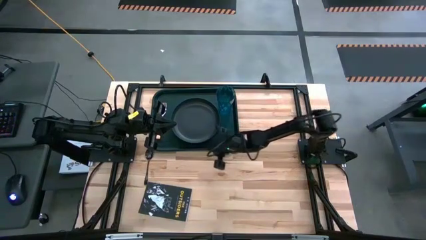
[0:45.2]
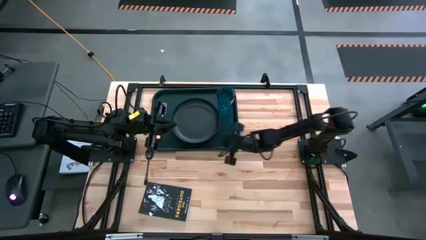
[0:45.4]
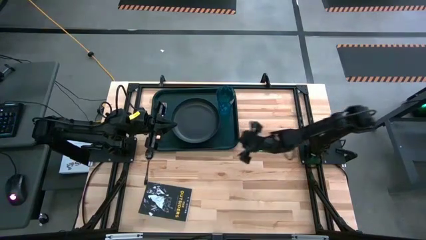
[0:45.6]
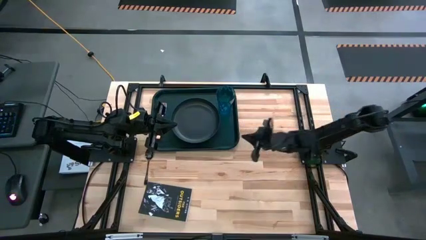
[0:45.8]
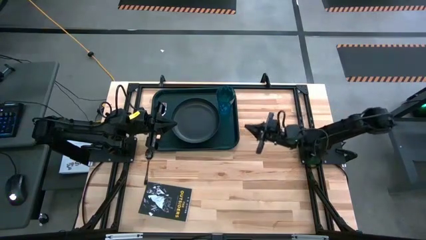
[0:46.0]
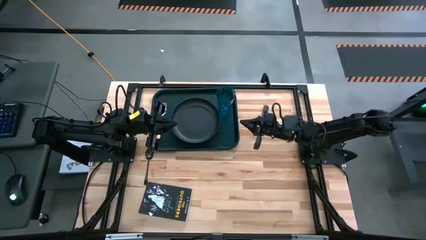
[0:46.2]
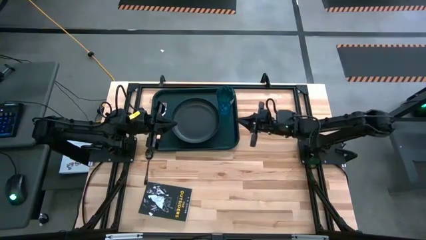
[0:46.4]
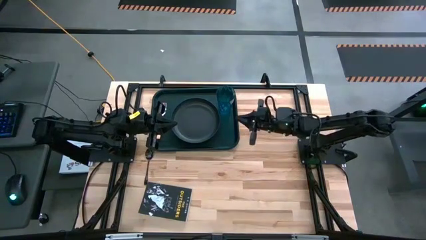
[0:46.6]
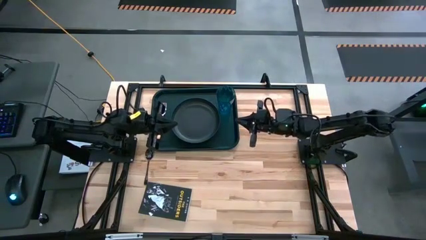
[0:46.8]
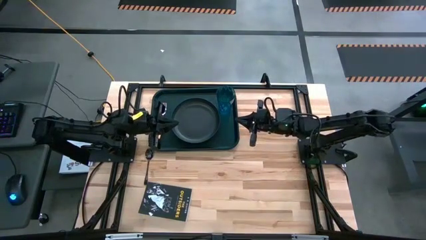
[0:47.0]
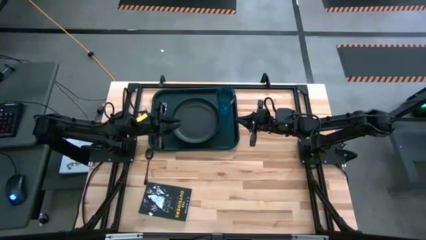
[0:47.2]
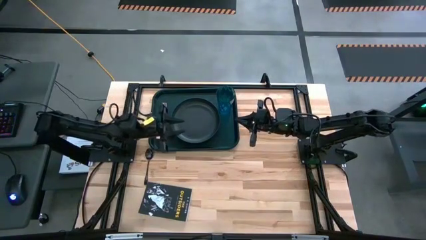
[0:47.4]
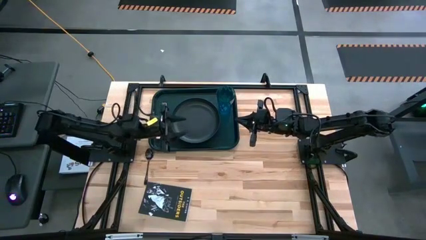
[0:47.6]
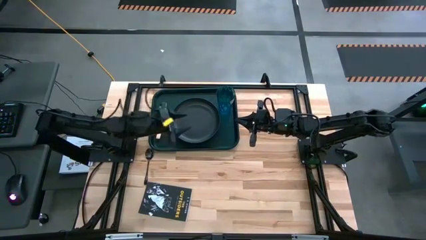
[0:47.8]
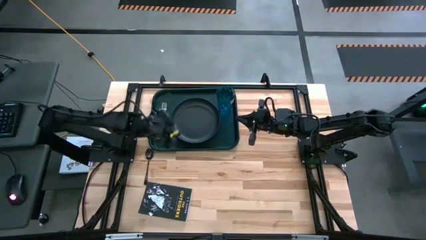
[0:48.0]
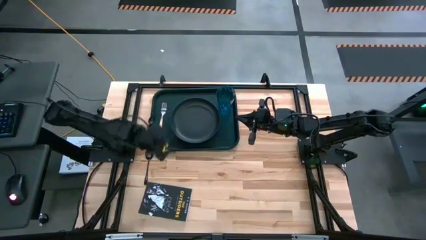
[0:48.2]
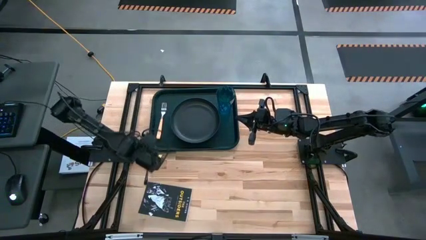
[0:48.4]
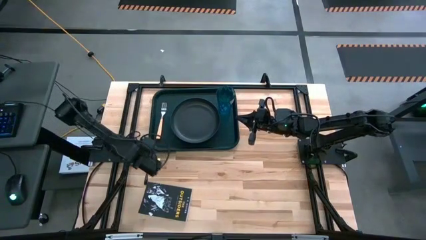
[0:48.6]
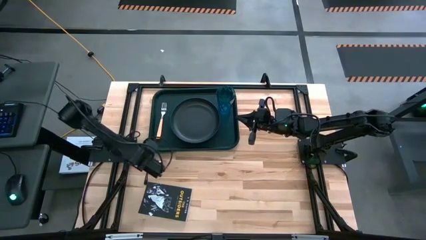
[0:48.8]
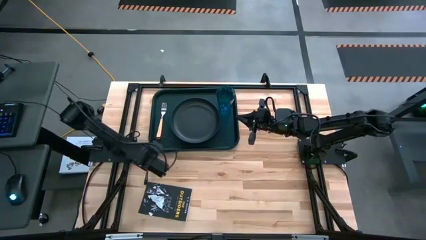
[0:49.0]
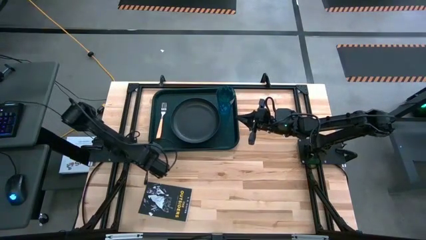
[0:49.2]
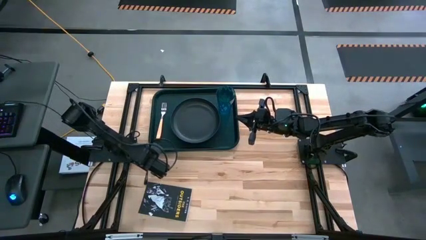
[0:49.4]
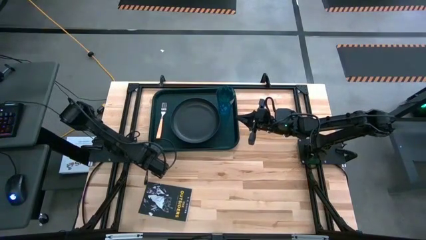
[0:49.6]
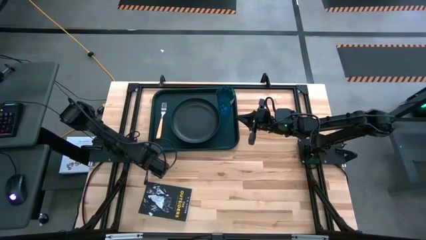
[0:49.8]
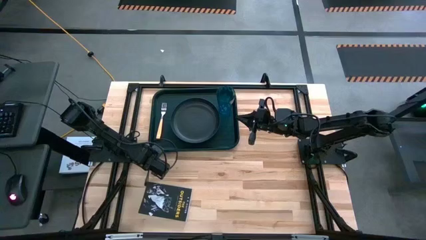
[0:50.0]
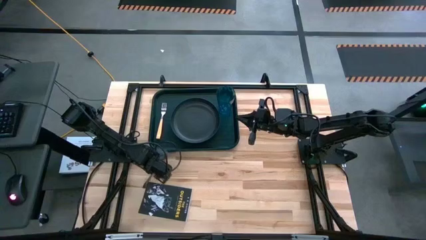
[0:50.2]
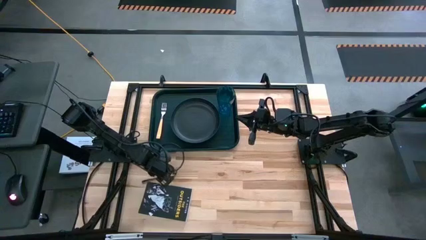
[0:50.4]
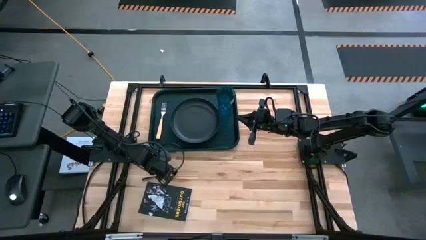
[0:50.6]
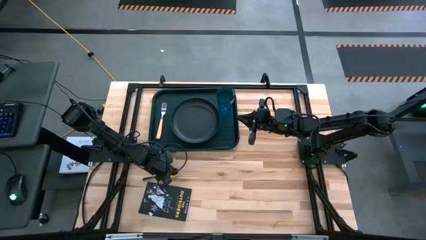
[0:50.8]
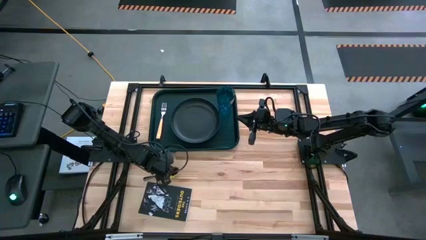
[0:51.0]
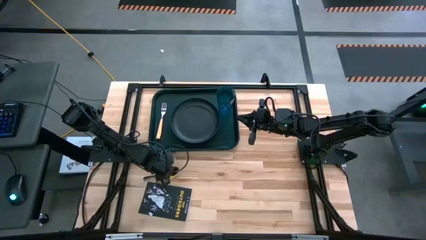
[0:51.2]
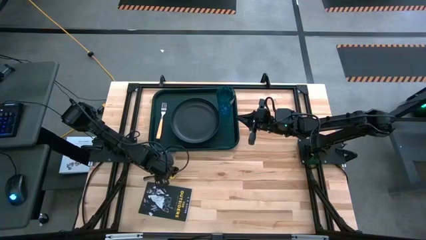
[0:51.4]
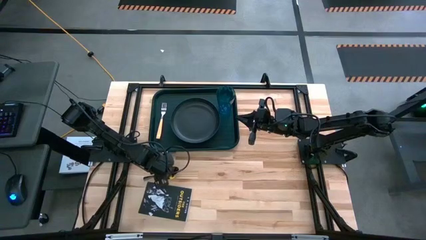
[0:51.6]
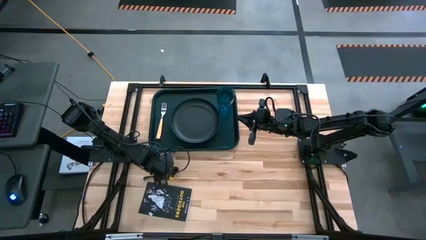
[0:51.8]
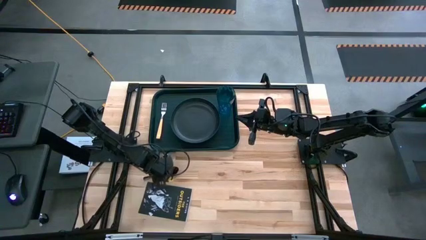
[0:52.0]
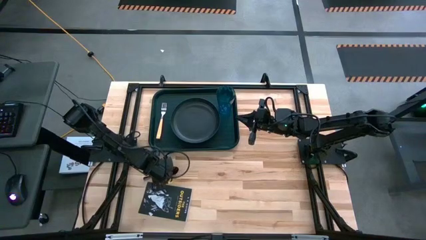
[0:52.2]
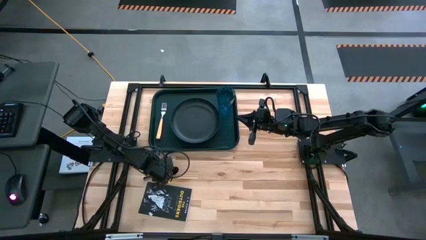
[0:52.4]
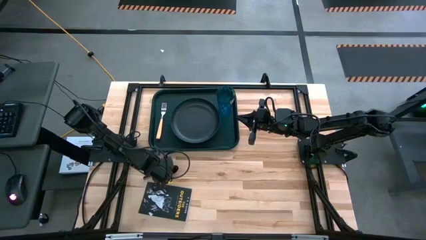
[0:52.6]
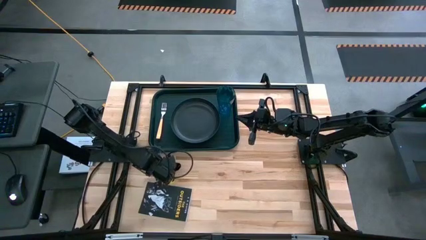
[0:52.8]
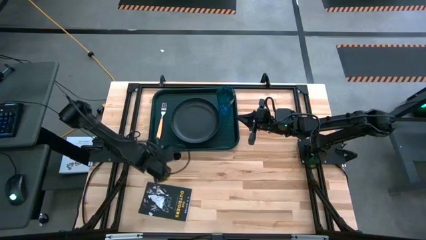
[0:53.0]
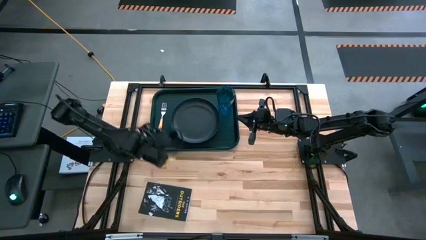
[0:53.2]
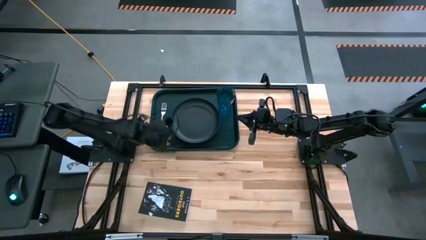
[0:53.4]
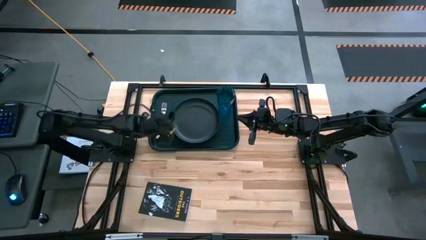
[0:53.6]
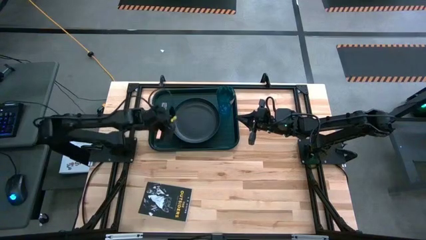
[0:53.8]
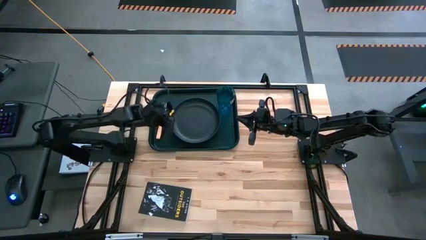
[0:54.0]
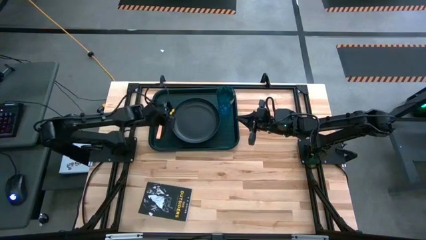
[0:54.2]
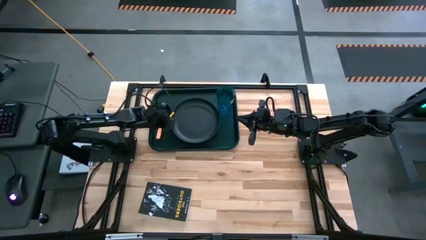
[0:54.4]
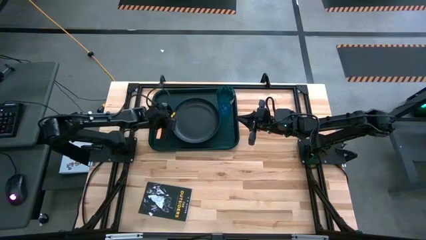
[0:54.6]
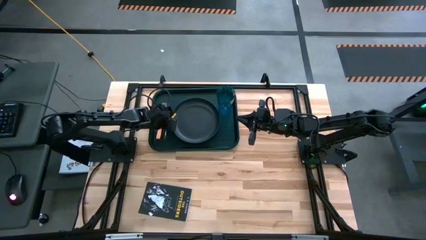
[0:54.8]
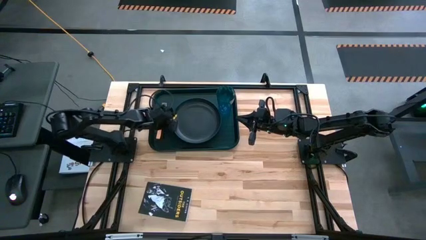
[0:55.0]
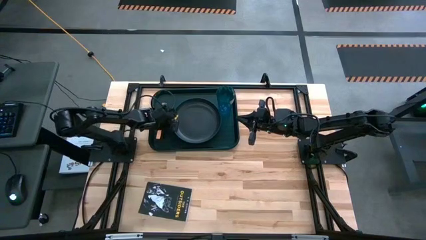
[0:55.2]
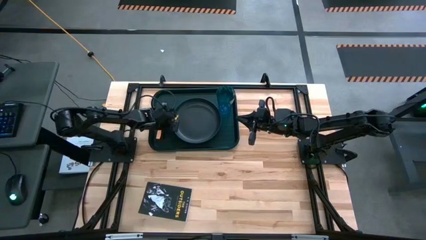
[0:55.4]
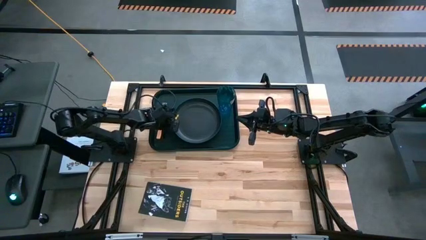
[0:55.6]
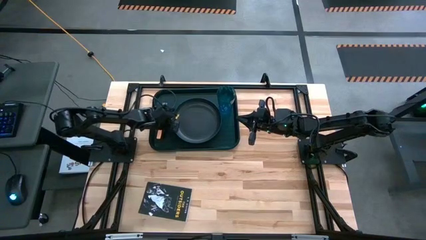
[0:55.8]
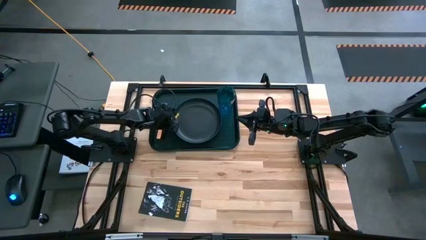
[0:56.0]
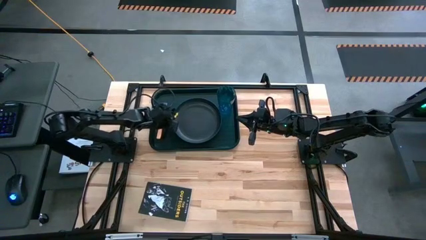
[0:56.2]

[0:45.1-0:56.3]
Task: Pick and place plate/cup/fork/spoon on tray
Put the black spoon on the right side of the orange fork on the black tray

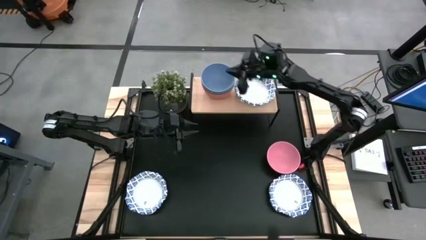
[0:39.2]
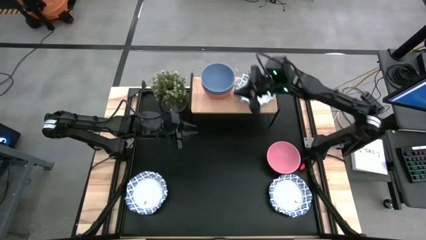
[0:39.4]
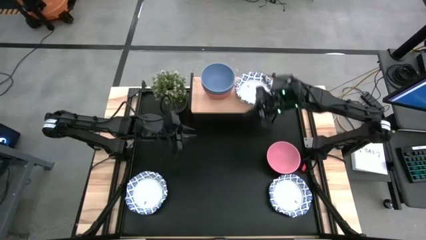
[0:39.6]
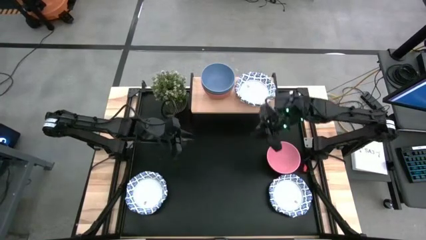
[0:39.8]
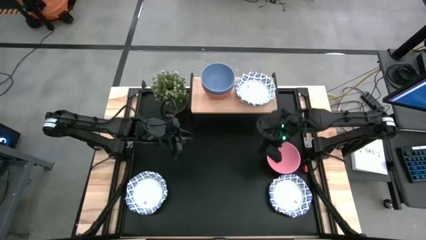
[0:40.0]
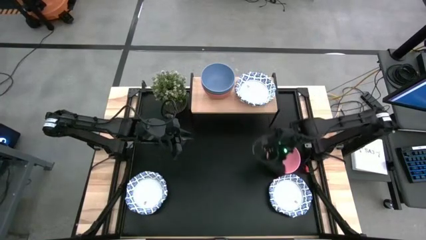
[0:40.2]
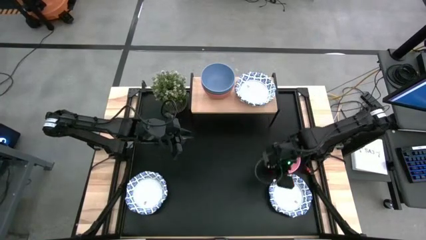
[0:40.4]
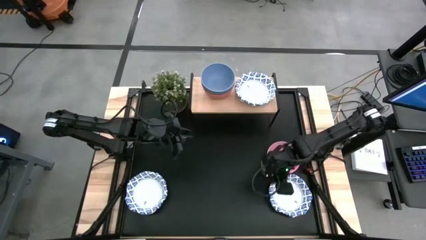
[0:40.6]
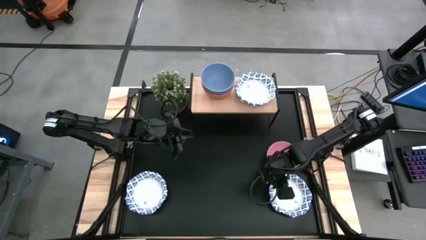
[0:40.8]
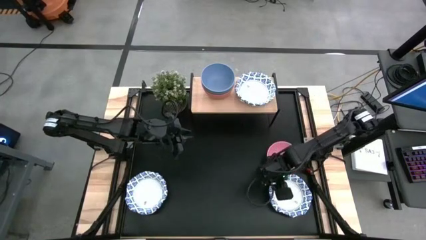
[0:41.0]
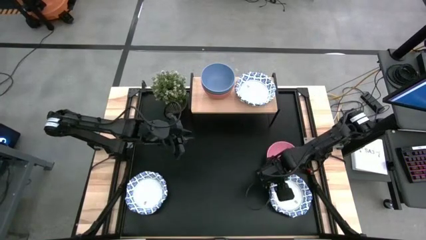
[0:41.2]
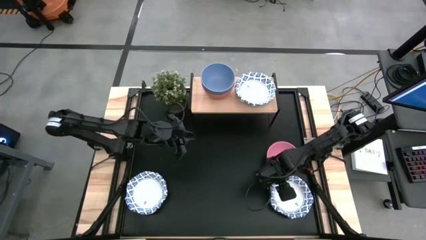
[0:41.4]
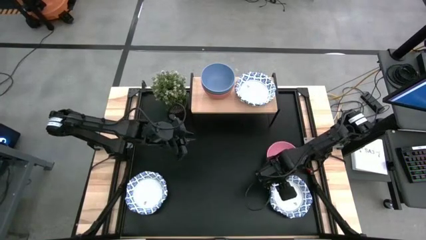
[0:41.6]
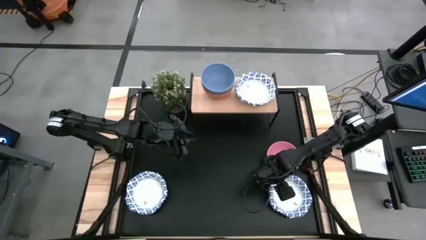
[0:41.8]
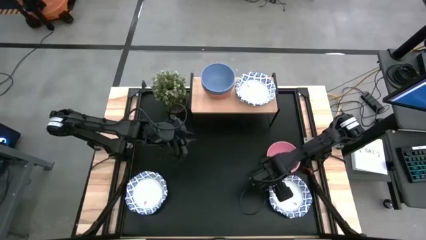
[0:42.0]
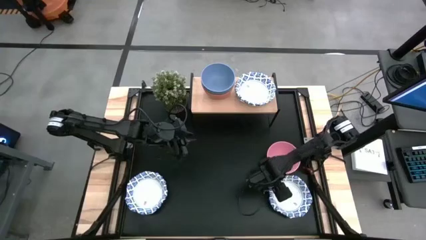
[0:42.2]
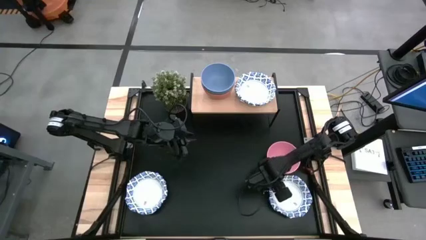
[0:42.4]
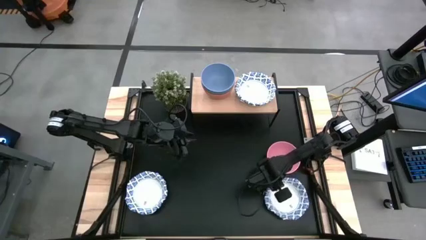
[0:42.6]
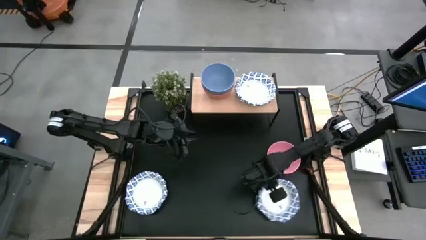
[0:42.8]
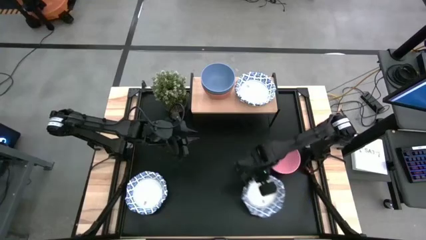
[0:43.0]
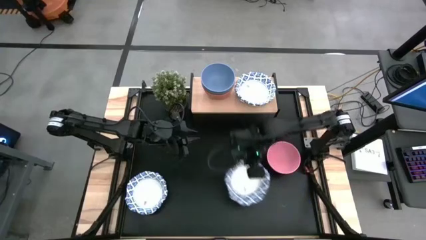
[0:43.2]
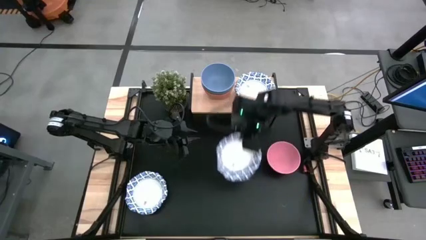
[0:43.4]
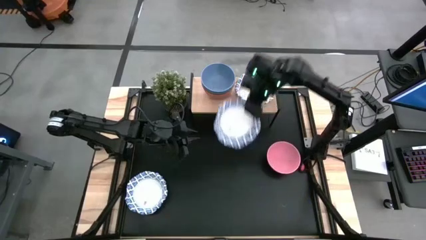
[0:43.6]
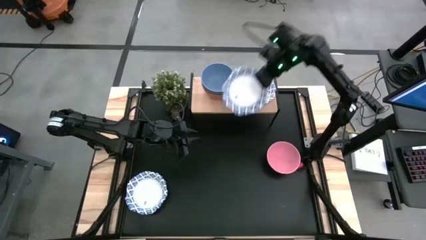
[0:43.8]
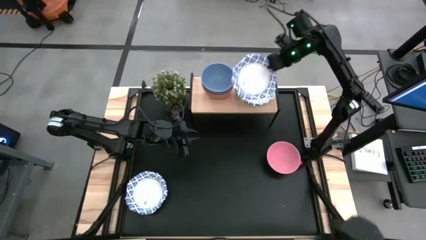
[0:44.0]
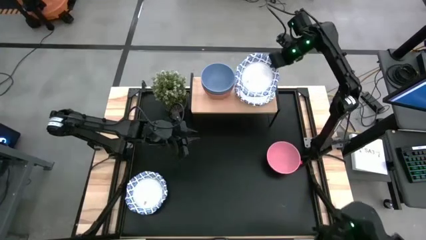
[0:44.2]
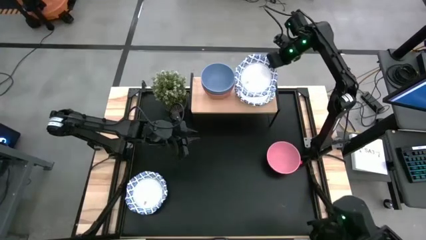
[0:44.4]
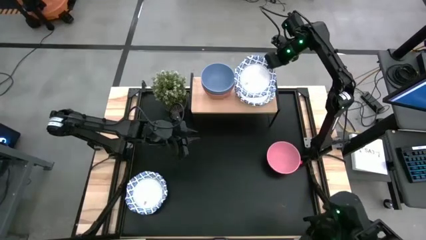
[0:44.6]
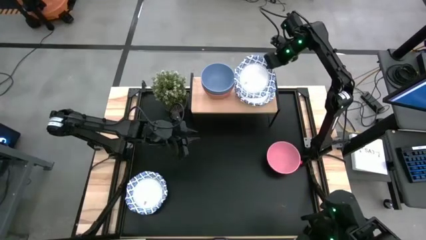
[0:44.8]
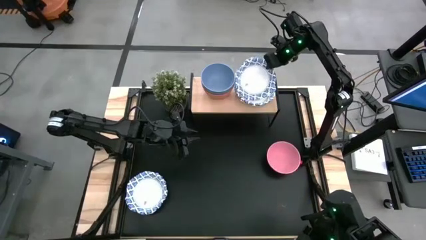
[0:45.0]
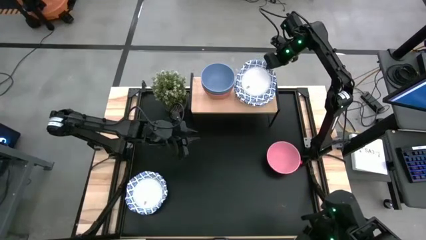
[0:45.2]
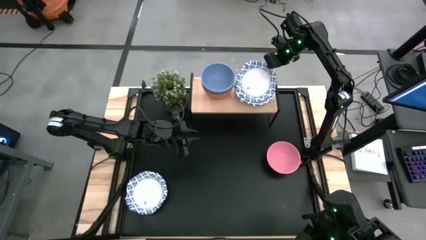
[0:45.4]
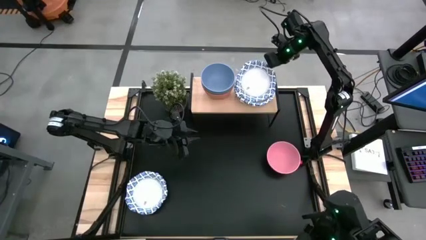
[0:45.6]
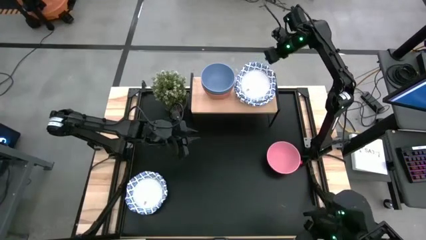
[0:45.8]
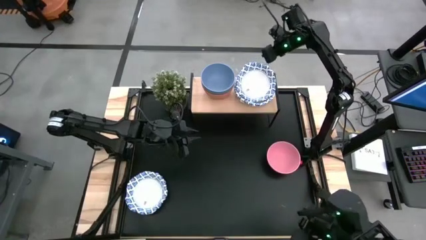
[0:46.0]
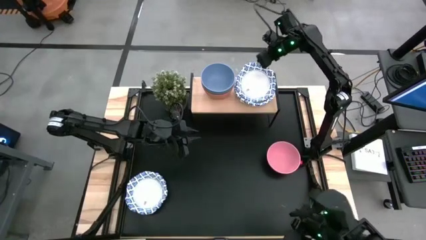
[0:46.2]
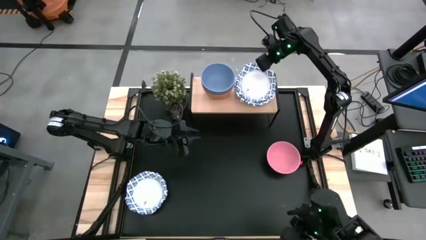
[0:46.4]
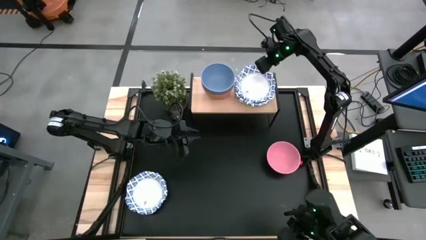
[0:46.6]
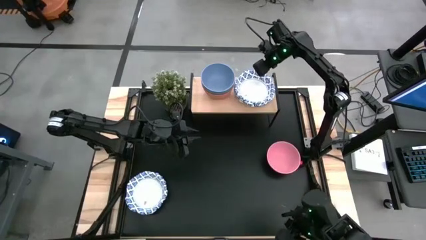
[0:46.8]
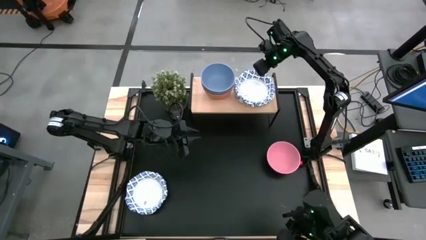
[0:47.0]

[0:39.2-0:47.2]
Task: Place and stack bowls onto a shelf
Stack the white patterned bowl on top of the white patterned bowl on the shelf
